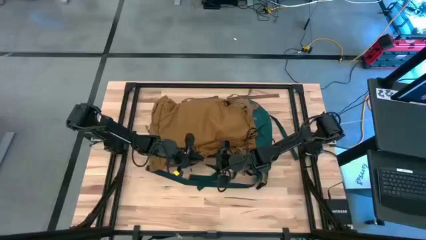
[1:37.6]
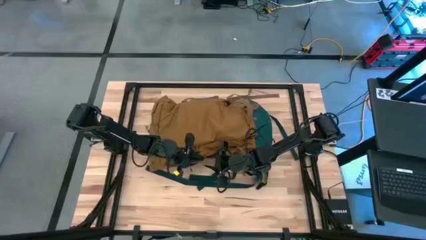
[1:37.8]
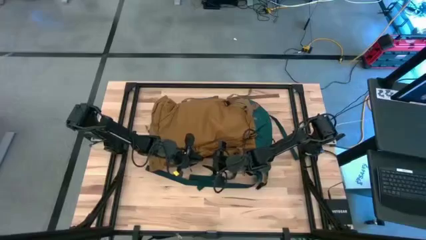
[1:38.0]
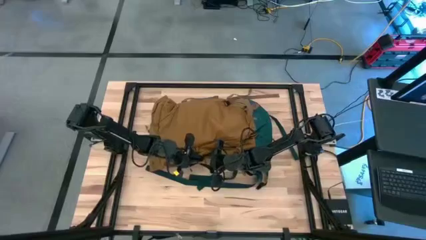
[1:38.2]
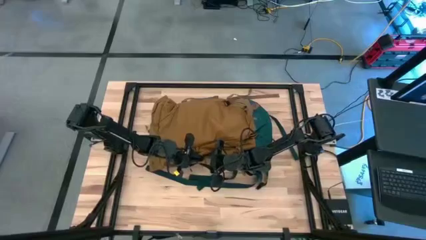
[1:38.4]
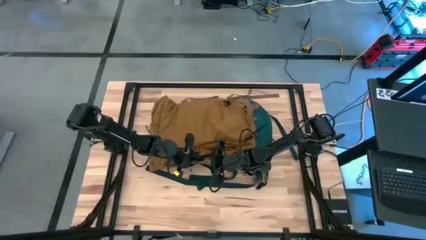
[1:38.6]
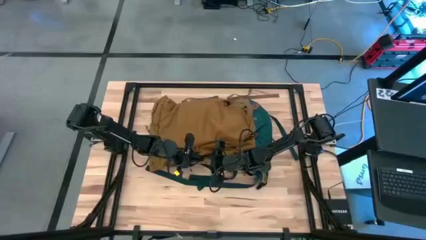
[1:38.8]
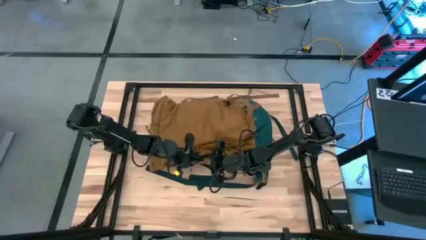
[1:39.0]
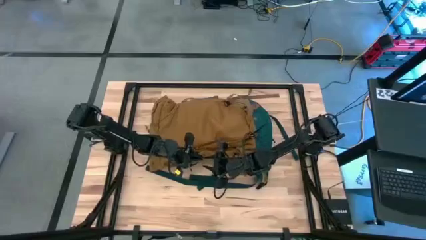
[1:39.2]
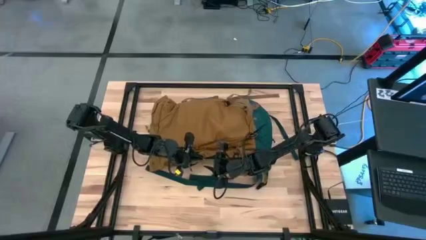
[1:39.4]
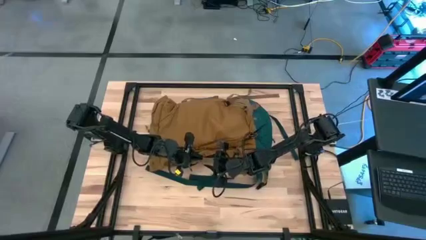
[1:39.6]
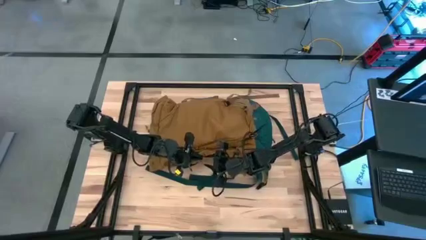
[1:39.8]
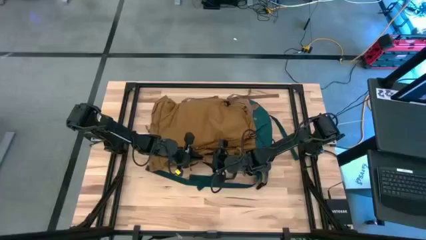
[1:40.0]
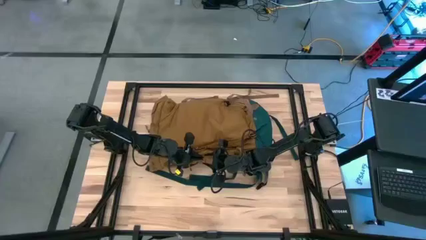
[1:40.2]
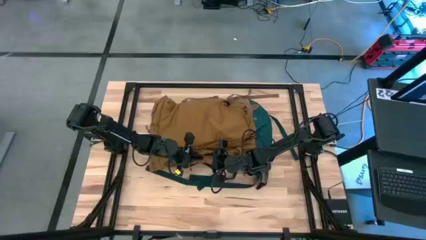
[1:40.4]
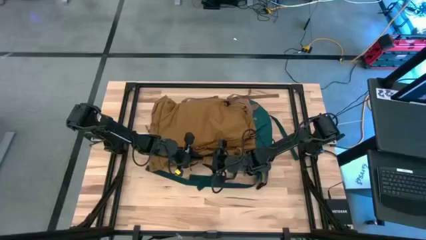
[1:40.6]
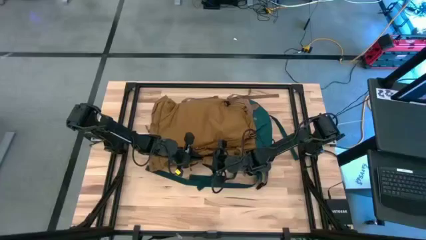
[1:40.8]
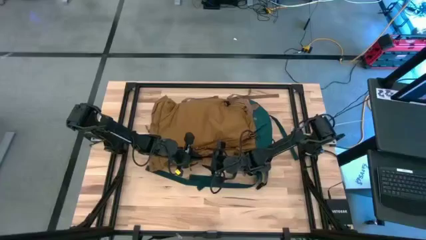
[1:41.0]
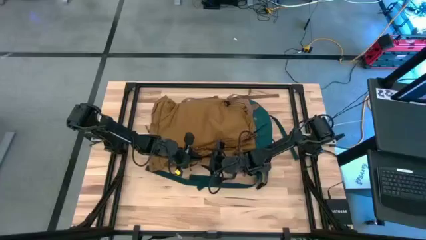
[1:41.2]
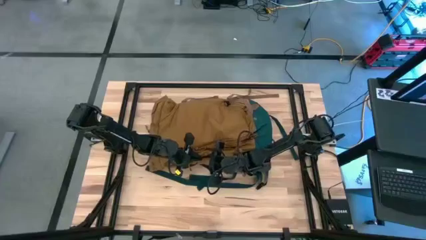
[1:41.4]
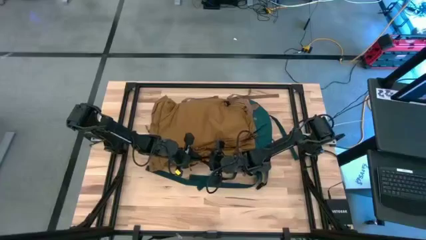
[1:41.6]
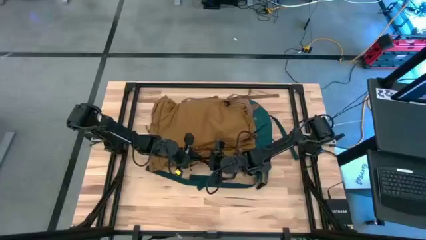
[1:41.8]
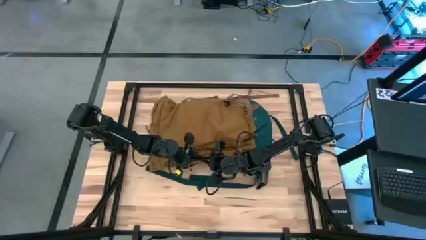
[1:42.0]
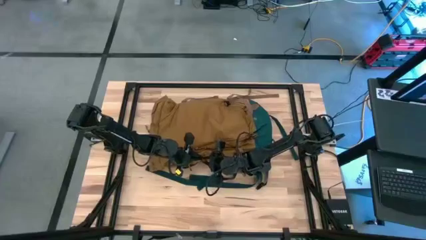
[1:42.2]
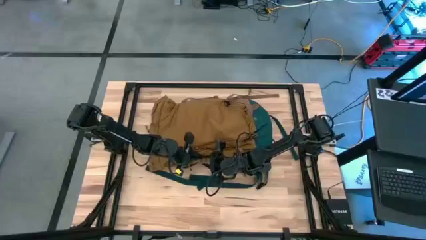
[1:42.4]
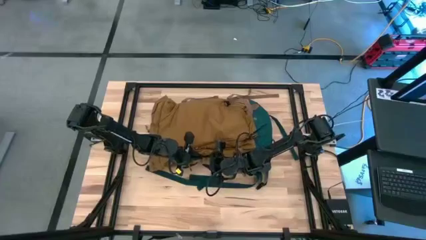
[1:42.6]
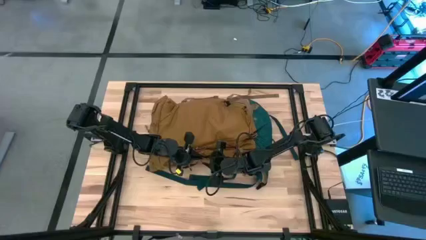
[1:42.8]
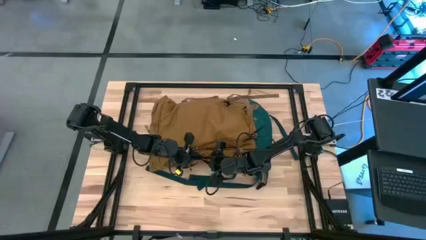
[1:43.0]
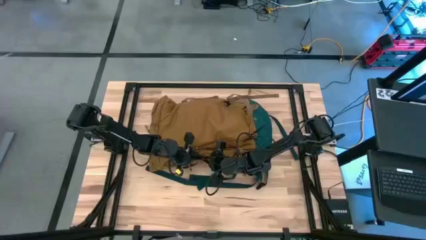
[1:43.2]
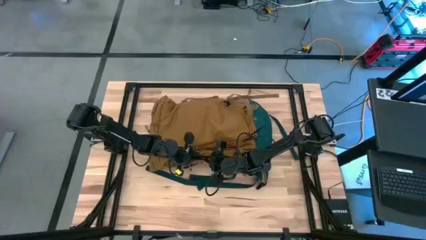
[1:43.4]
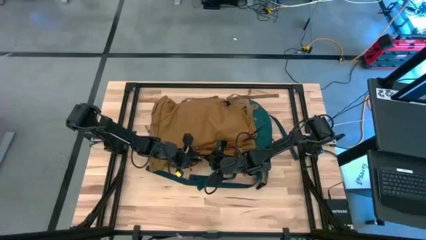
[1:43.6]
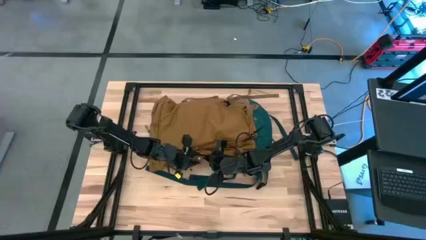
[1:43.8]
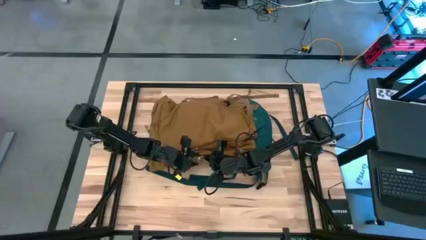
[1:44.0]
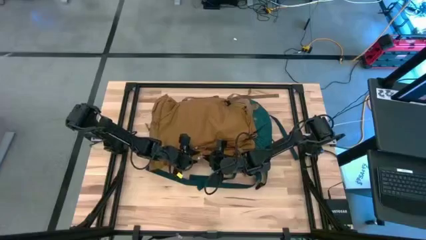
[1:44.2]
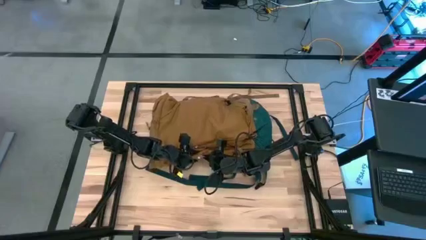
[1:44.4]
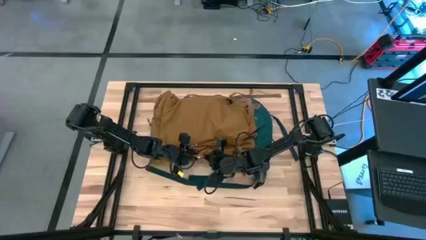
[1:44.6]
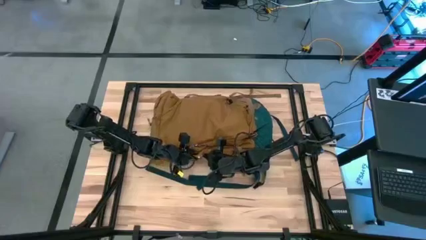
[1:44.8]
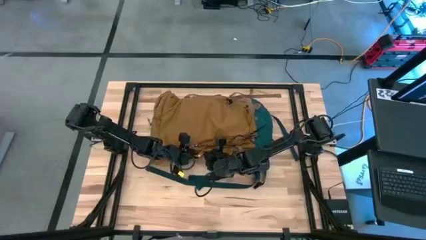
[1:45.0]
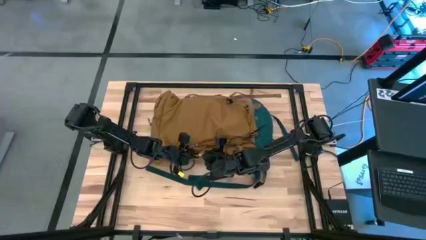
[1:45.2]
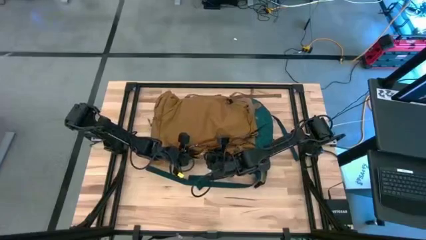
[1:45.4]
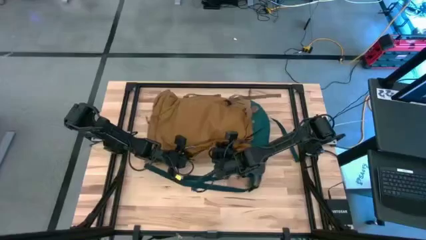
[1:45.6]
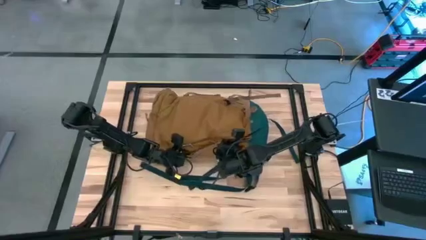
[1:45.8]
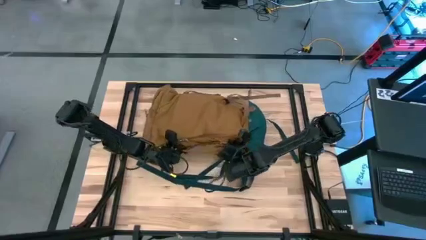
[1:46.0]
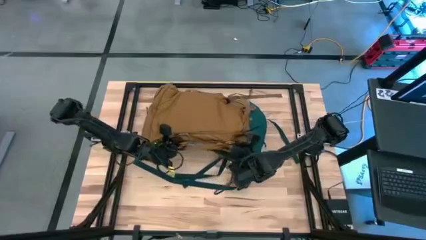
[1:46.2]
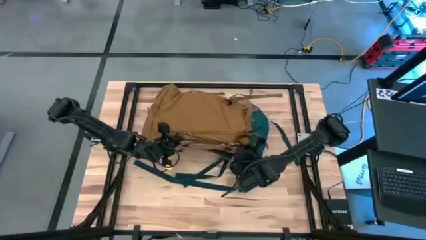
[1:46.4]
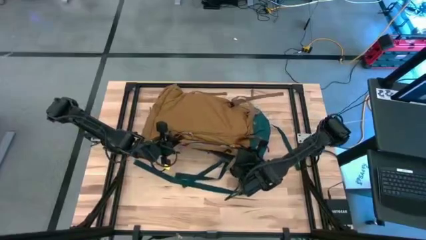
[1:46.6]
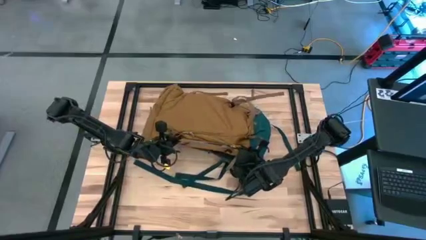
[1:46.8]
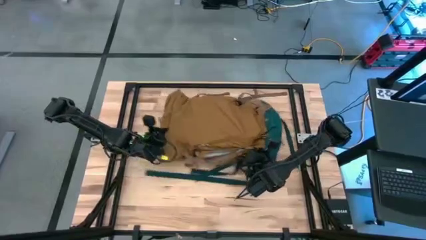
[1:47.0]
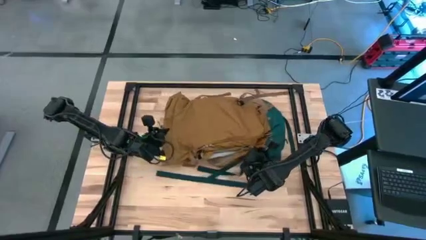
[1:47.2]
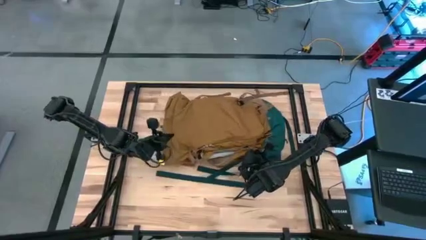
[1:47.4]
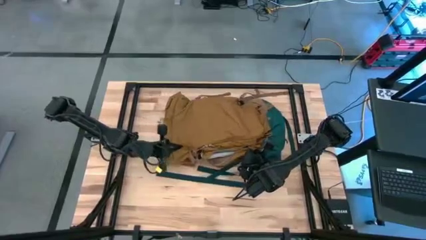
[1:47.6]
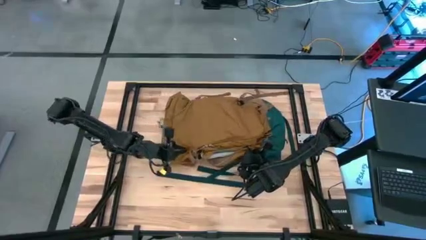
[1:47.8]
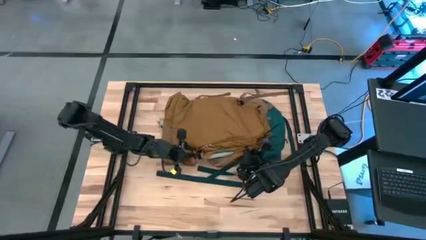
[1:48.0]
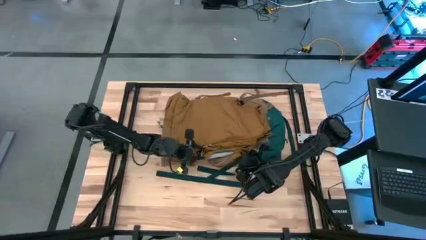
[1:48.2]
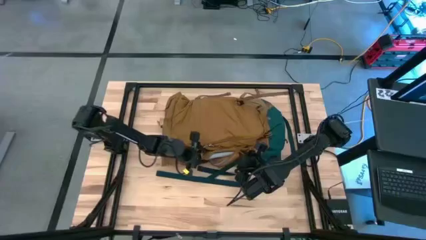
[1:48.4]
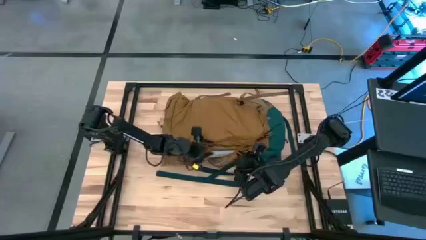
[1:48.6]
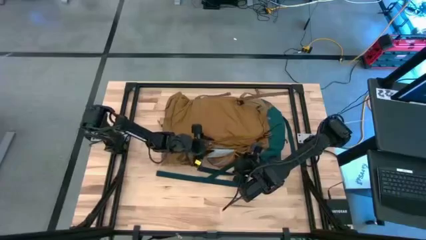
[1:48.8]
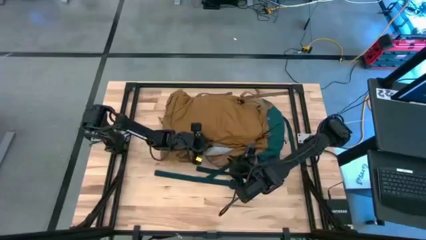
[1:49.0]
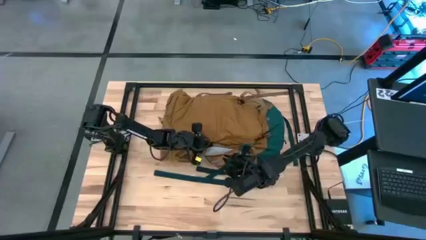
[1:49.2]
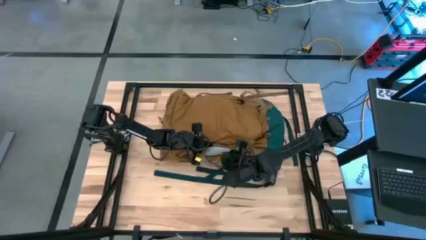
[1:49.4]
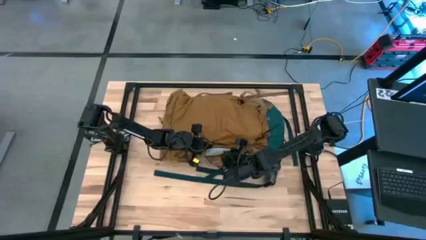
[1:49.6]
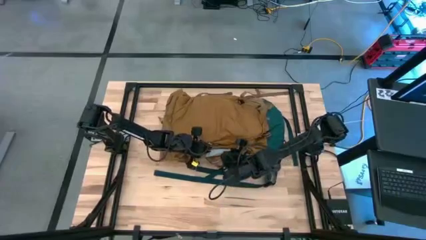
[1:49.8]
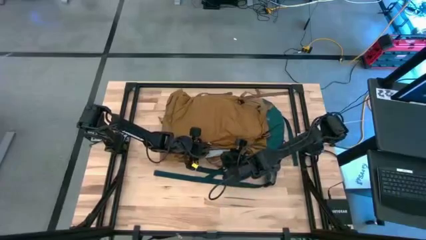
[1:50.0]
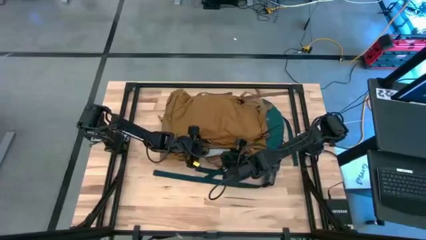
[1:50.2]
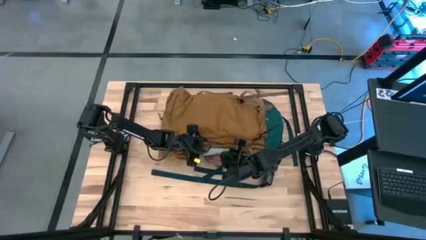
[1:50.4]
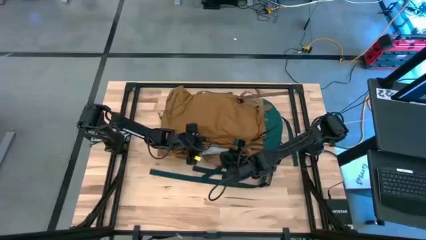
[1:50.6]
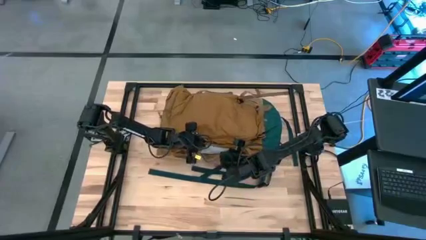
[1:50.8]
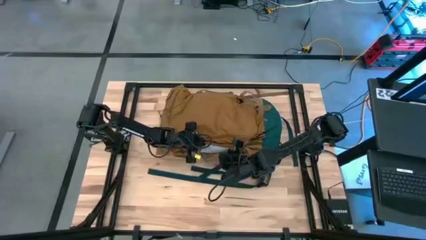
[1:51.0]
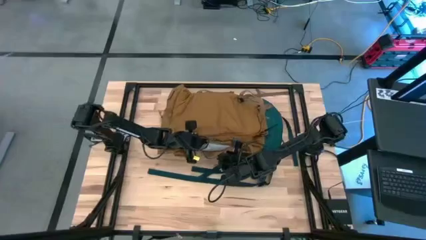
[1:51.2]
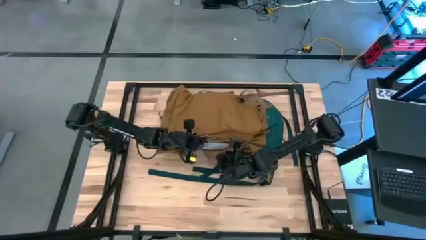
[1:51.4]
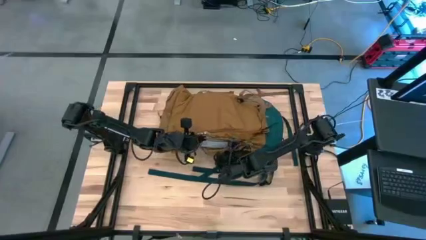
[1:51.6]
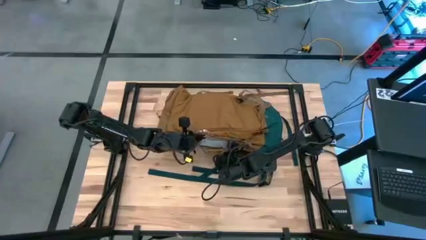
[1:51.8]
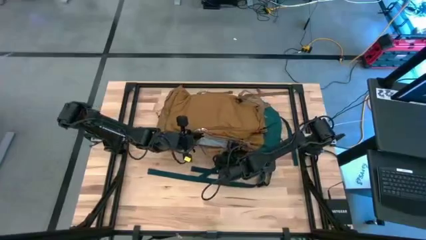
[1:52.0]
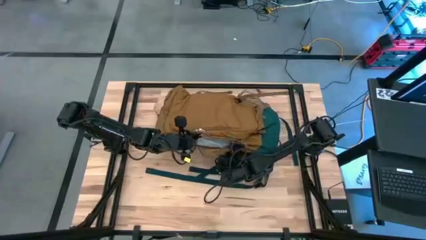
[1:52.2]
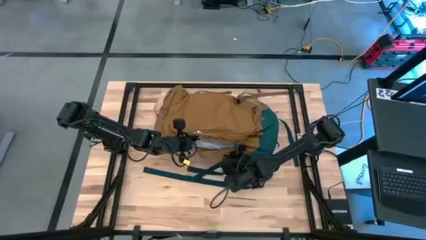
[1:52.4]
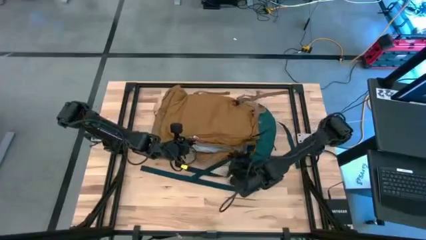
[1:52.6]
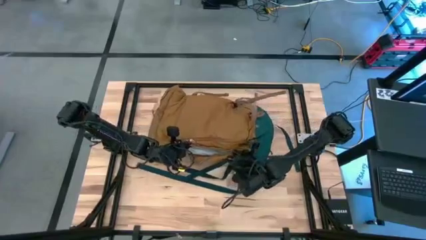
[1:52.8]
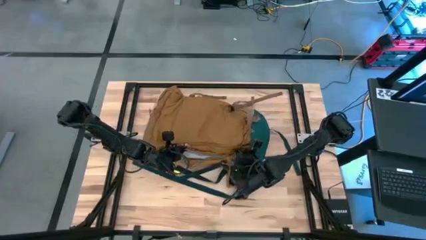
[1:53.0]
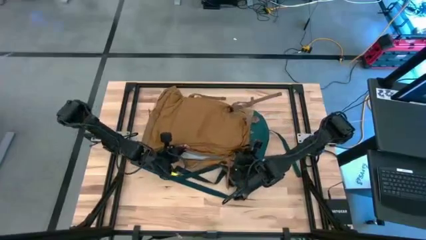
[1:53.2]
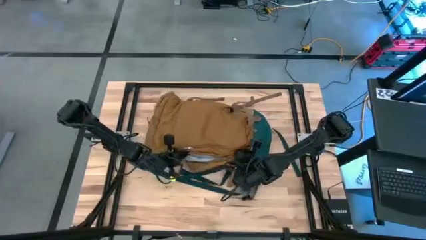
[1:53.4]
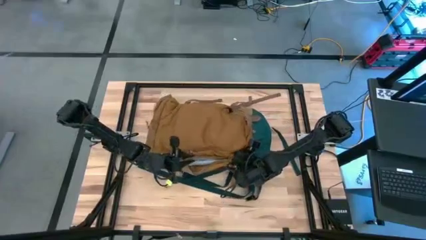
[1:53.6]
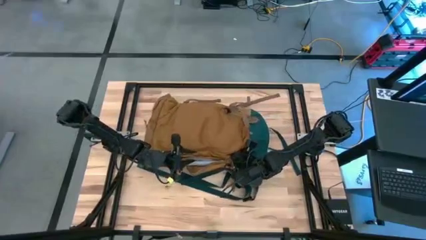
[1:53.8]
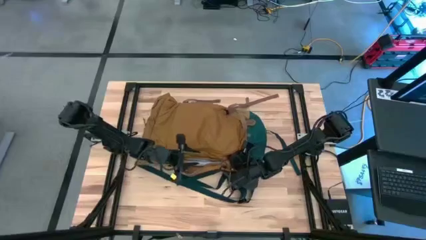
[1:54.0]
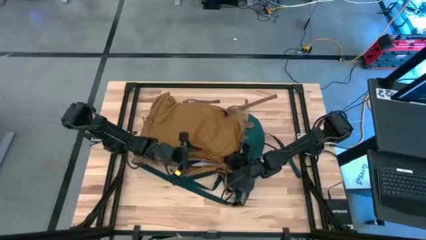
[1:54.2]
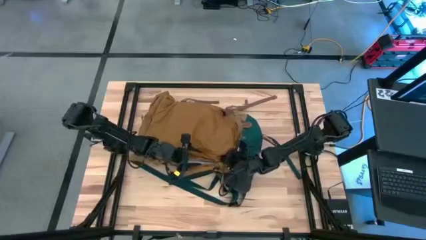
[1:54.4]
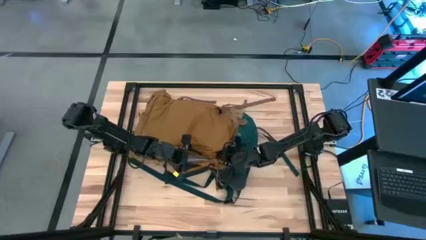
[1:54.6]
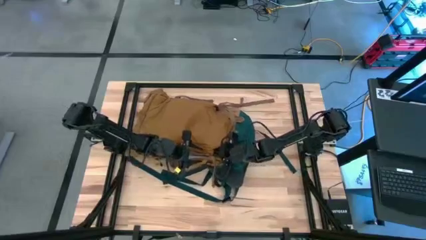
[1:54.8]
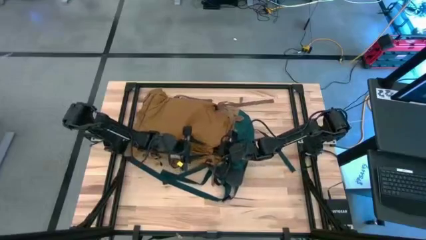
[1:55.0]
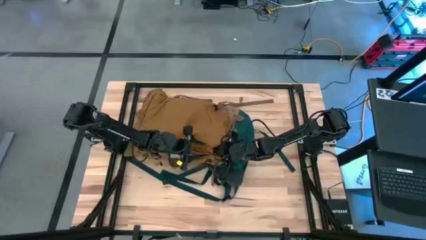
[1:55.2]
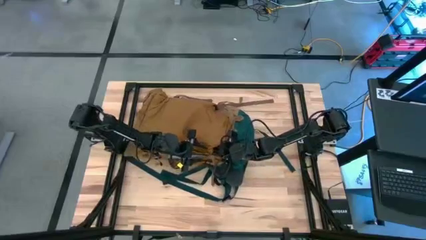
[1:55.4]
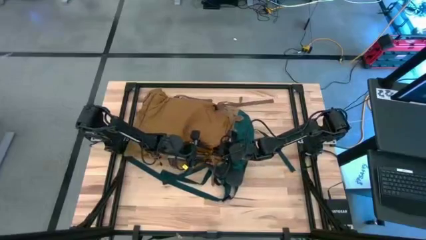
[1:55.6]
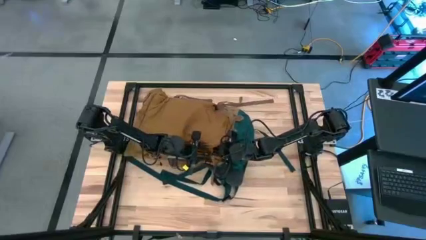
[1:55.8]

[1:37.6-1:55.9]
Task: Unpack backpack
Open the brown backpack
